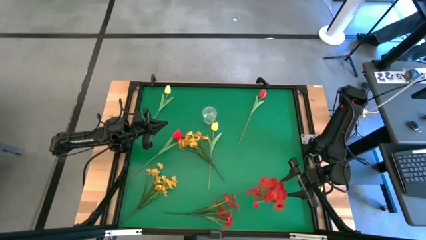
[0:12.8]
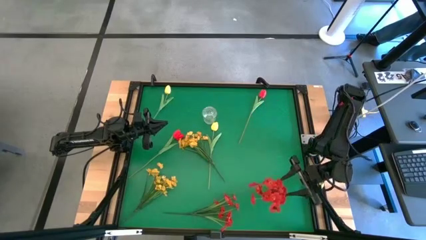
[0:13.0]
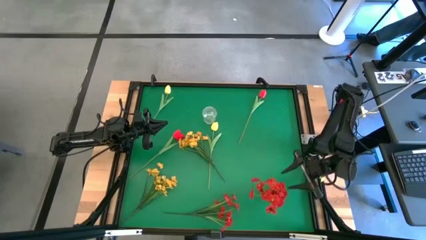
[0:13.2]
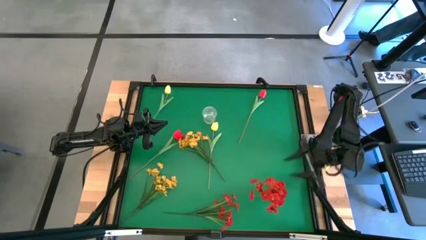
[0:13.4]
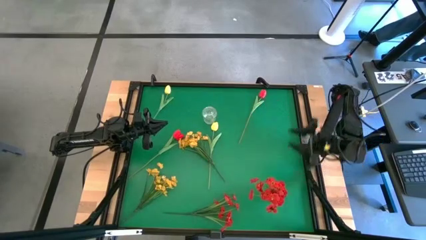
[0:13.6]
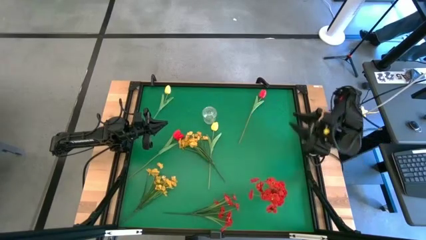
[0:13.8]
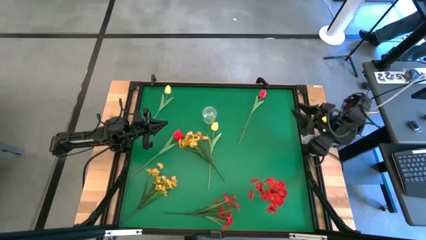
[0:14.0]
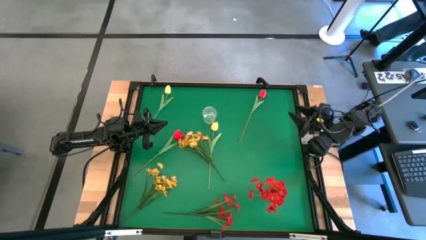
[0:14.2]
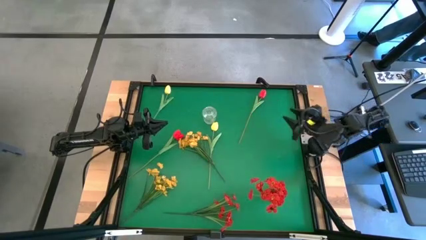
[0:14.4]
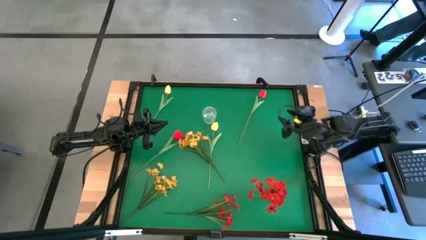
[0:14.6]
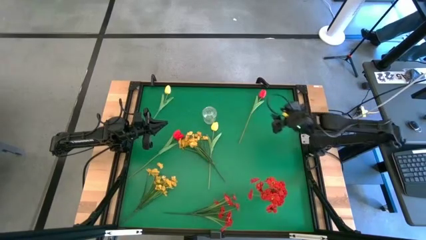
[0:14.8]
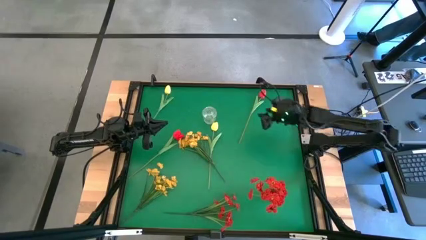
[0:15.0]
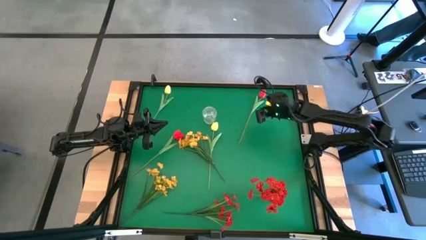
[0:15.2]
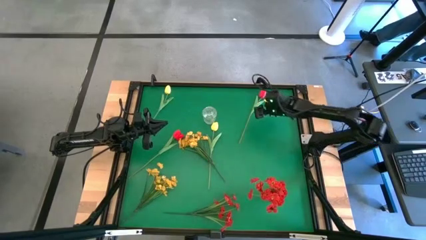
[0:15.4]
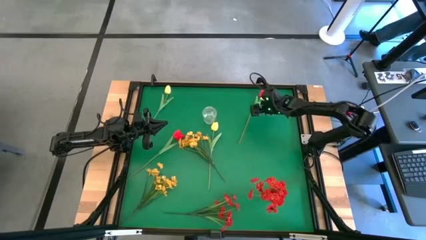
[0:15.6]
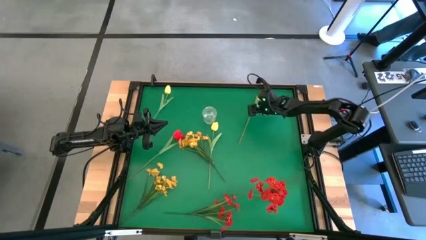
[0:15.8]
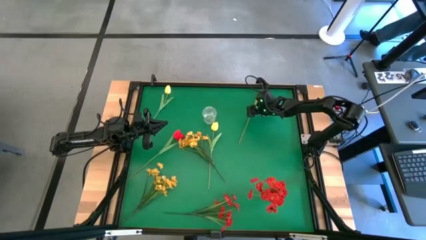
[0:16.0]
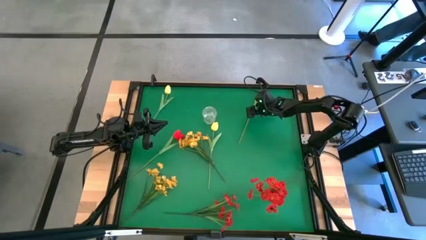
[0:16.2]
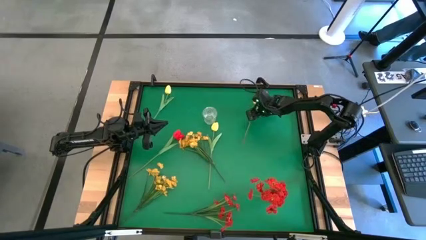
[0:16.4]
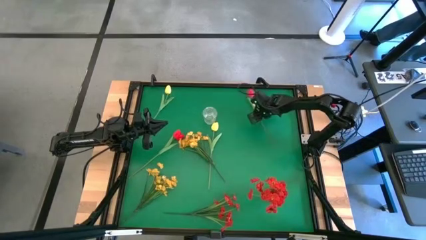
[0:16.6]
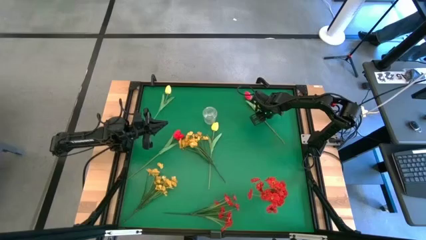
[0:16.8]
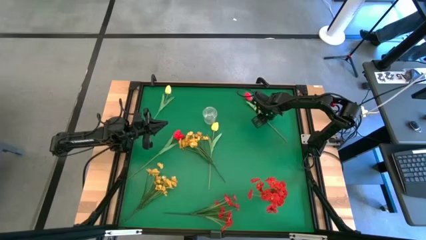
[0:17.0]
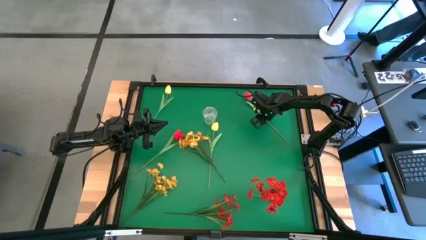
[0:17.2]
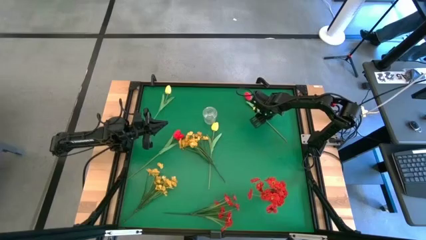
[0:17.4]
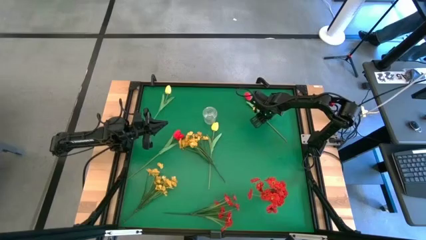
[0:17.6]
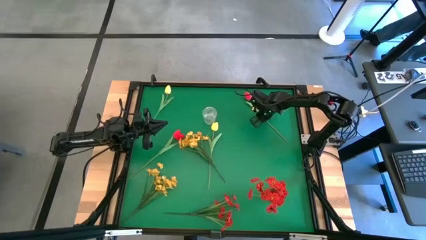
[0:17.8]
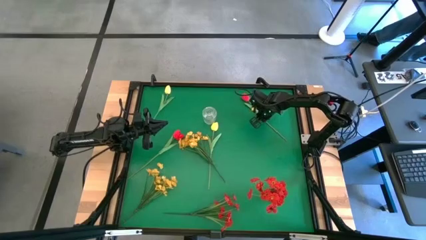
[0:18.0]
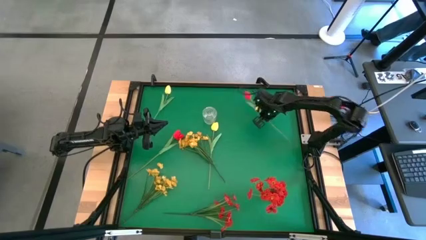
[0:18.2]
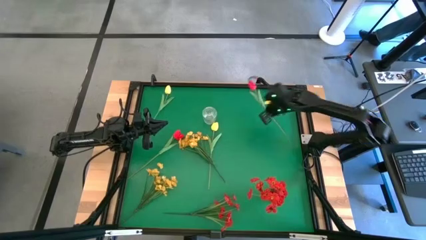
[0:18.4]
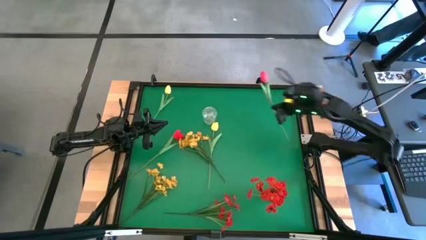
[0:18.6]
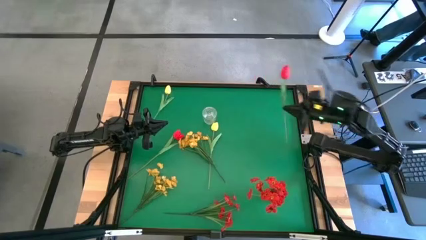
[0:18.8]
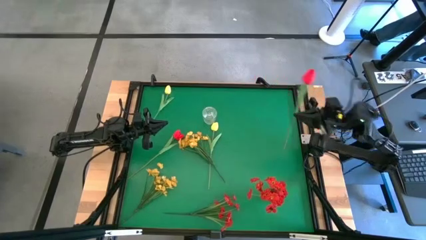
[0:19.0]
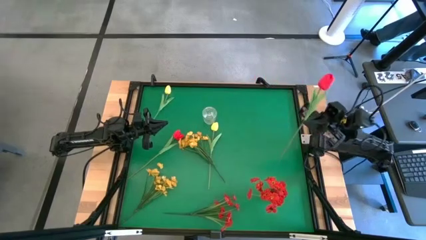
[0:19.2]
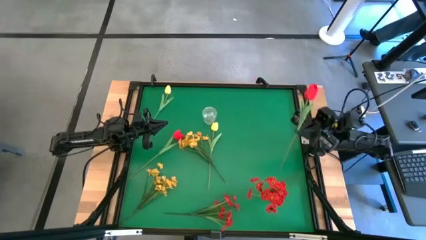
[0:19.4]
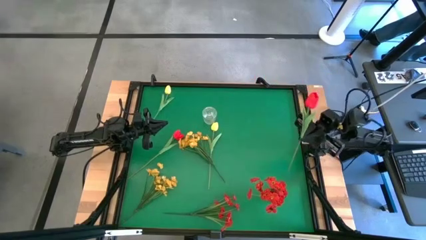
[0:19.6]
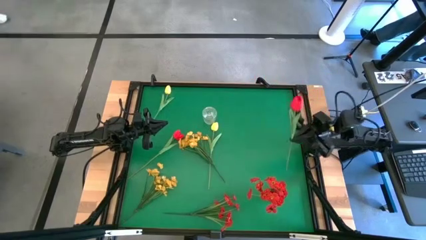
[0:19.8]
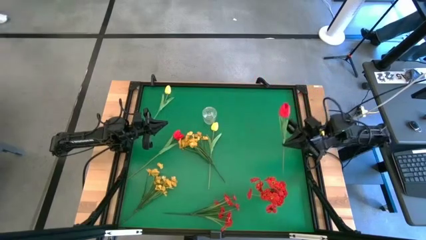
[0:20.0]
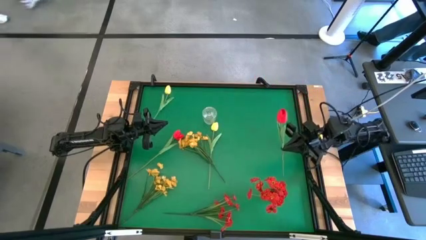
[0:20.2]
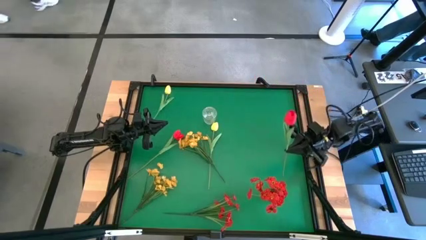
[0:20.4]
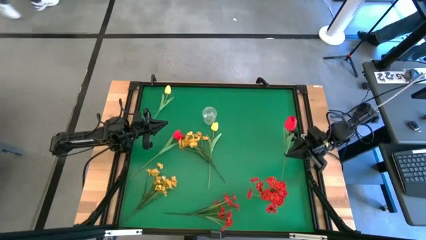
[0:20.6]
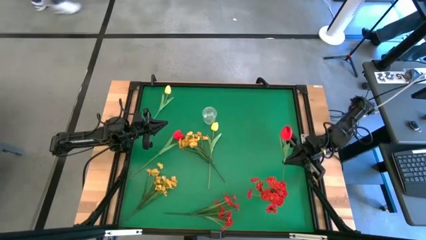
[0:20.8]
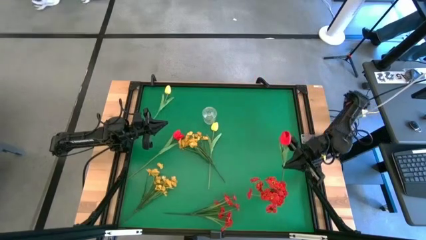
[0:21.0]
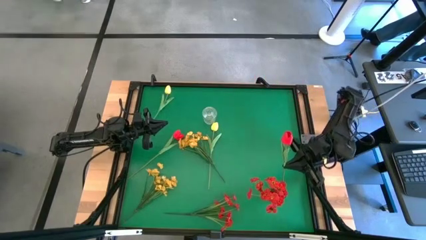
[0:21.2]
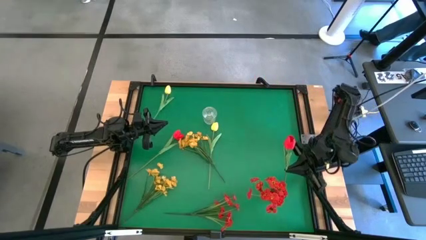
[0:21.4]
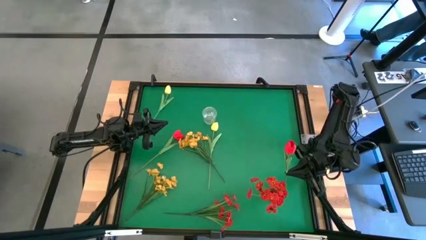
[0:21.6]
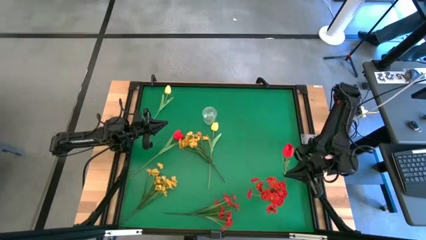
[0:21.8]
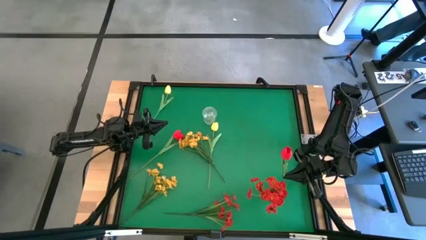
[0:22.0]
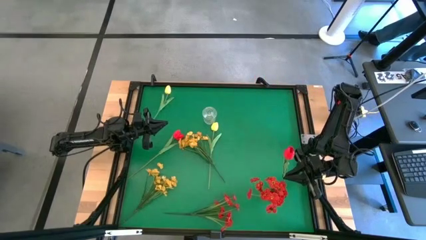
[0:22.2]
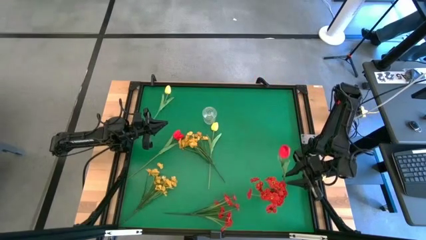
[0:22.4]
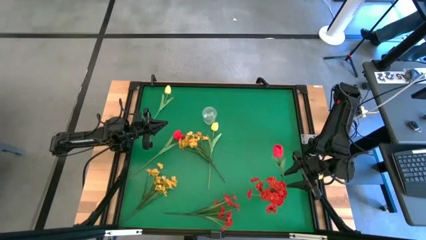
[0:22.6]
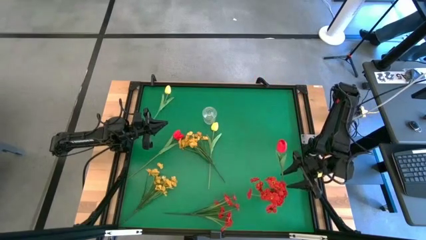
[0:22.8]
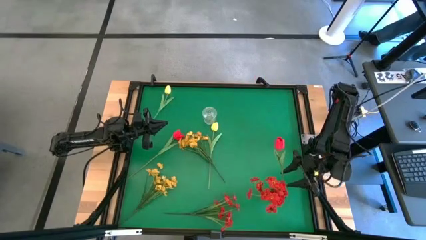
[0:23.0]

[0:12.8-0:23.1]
Task: Sort flowers into vase by color
Put the top right red flower into the red vase
